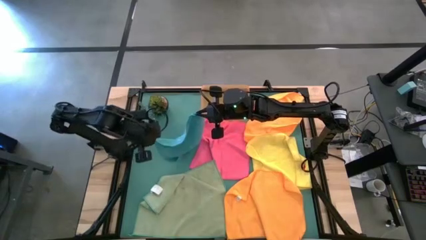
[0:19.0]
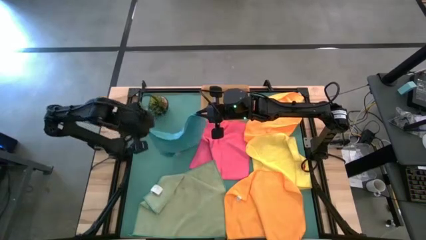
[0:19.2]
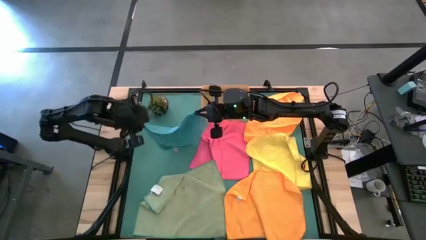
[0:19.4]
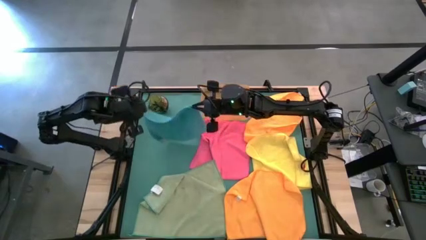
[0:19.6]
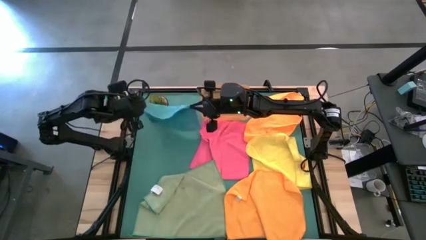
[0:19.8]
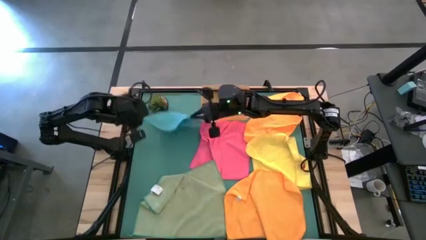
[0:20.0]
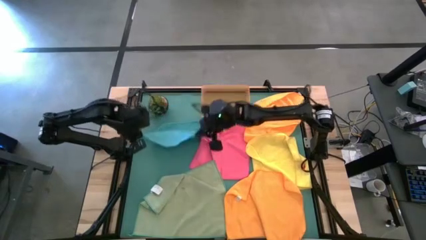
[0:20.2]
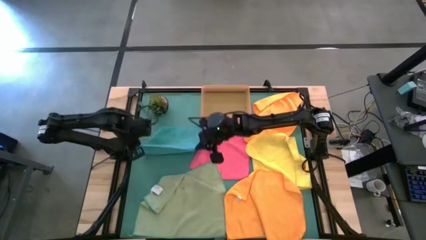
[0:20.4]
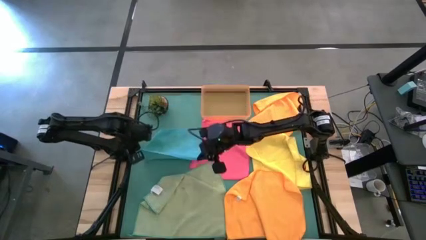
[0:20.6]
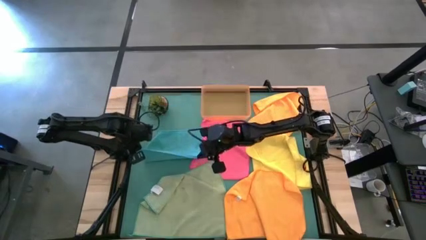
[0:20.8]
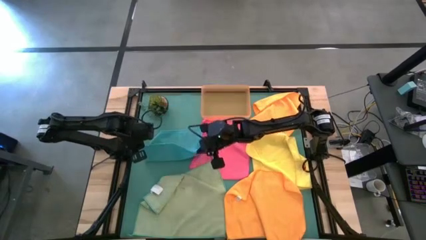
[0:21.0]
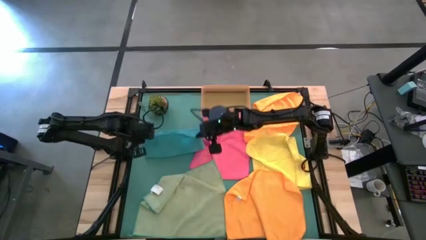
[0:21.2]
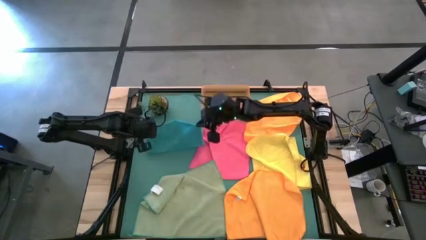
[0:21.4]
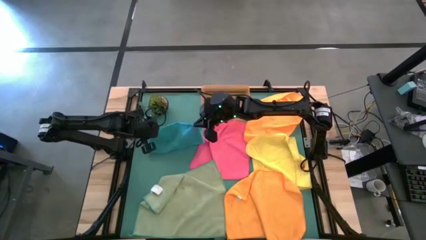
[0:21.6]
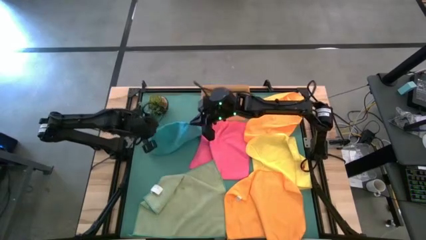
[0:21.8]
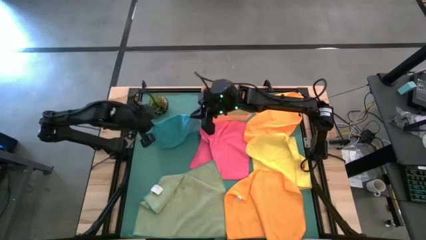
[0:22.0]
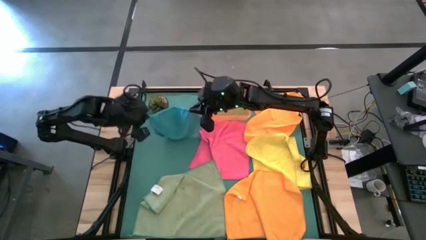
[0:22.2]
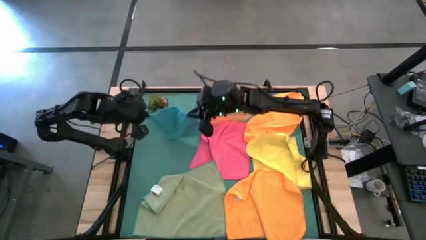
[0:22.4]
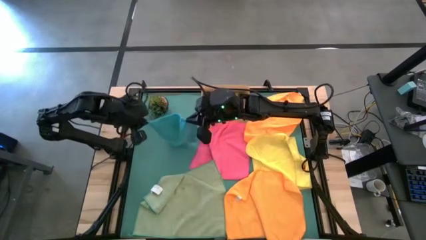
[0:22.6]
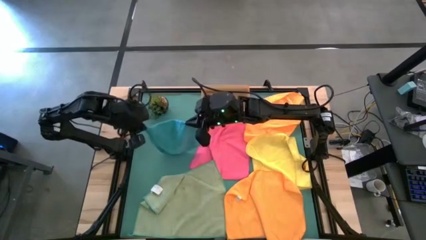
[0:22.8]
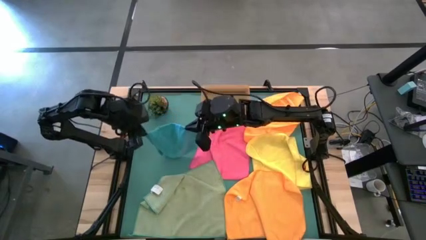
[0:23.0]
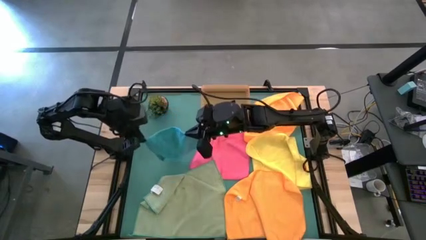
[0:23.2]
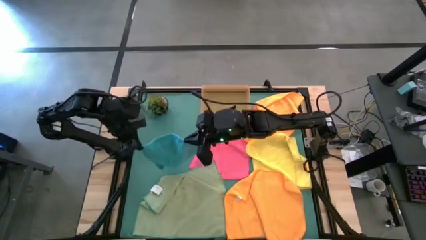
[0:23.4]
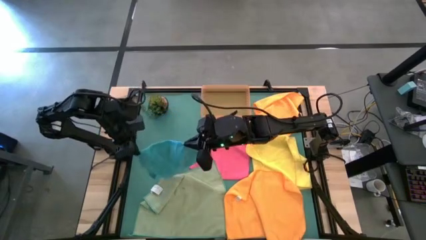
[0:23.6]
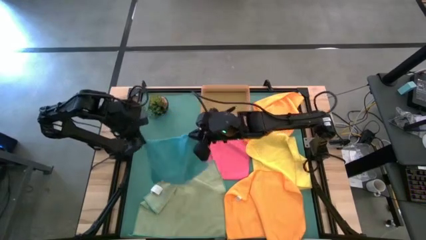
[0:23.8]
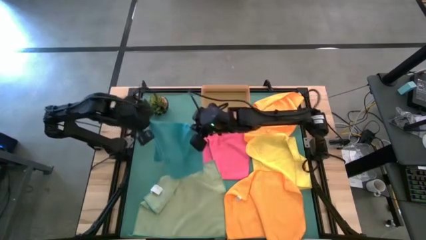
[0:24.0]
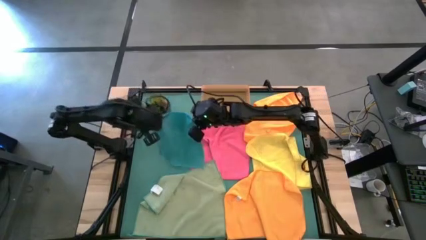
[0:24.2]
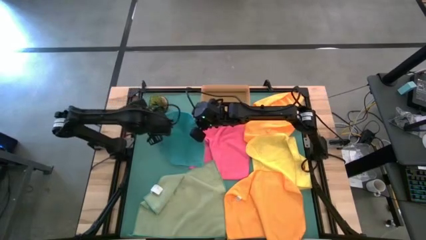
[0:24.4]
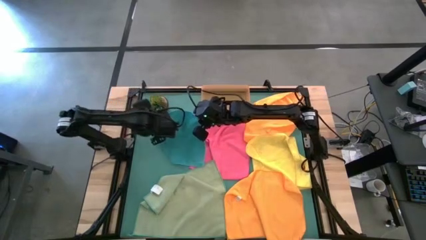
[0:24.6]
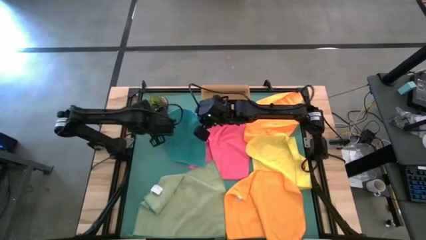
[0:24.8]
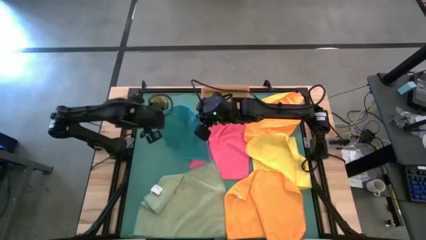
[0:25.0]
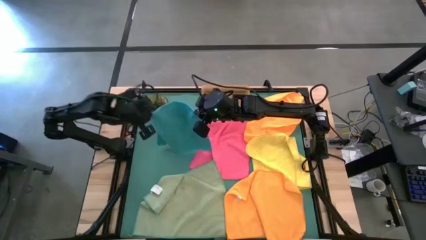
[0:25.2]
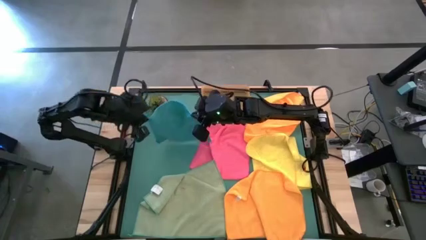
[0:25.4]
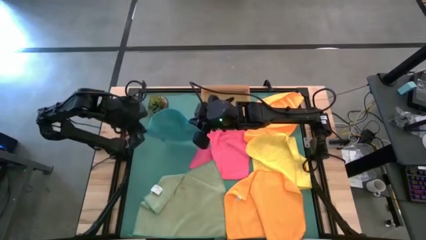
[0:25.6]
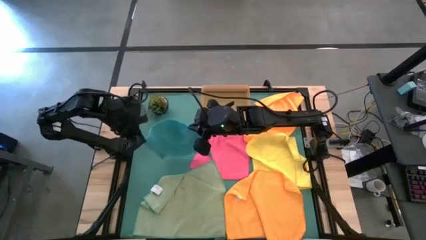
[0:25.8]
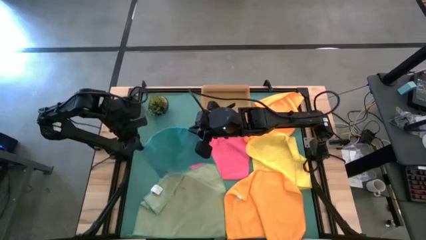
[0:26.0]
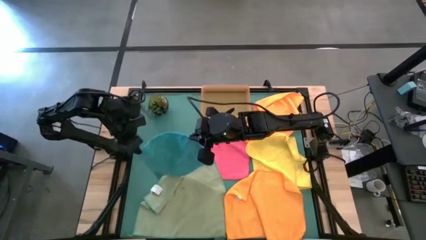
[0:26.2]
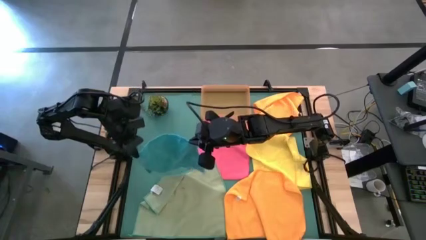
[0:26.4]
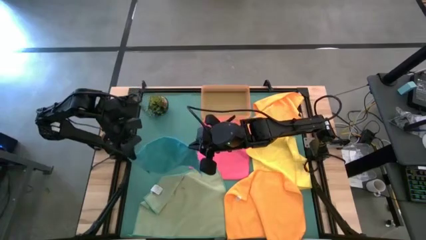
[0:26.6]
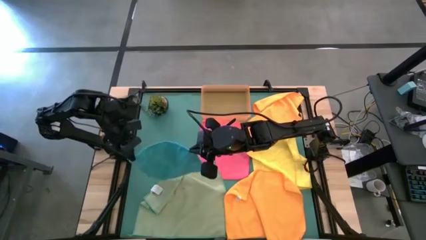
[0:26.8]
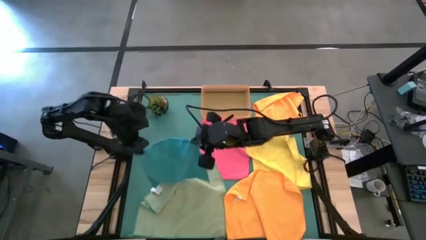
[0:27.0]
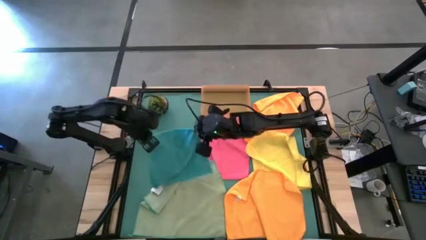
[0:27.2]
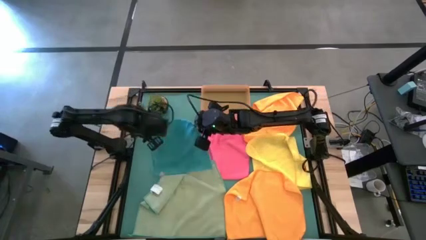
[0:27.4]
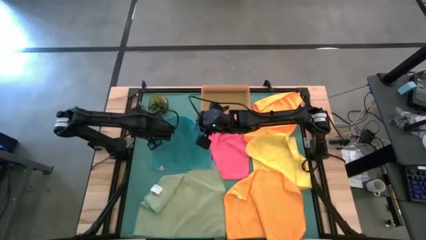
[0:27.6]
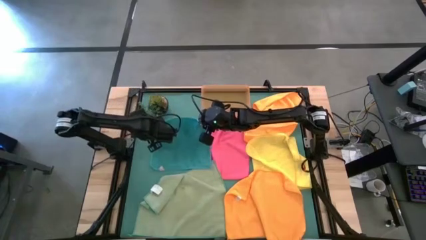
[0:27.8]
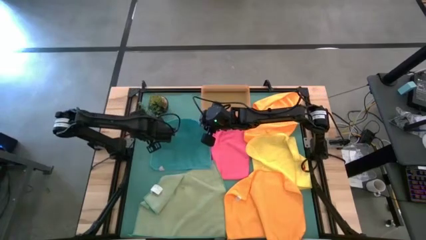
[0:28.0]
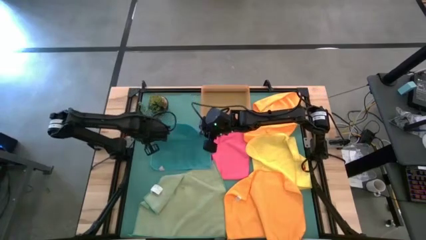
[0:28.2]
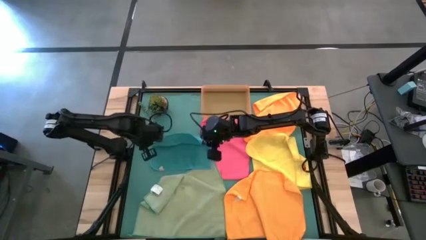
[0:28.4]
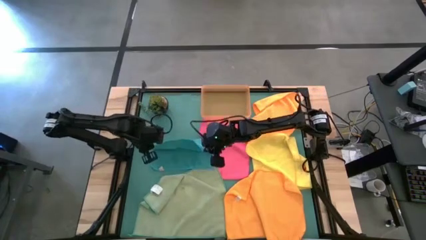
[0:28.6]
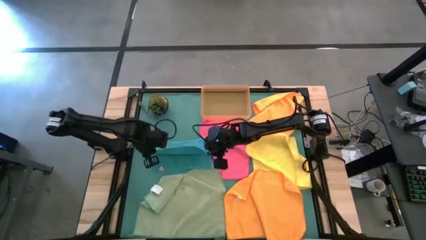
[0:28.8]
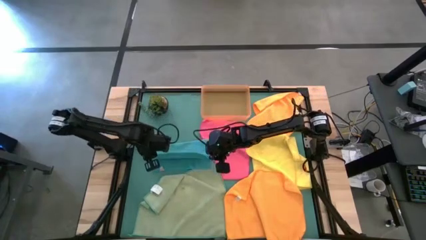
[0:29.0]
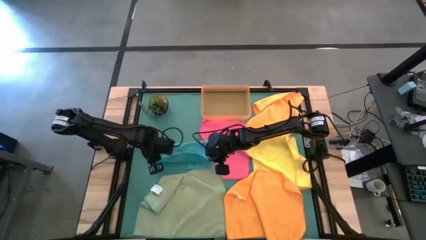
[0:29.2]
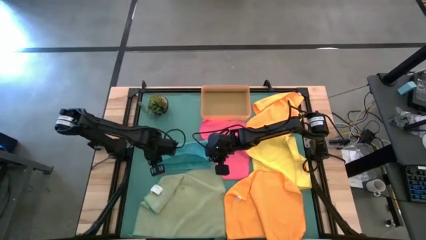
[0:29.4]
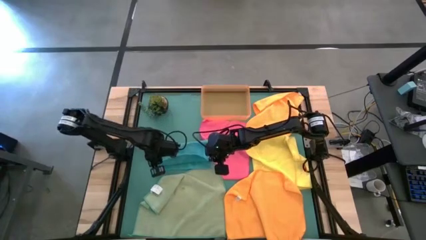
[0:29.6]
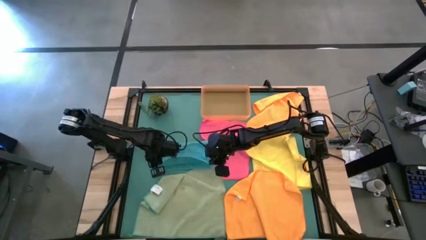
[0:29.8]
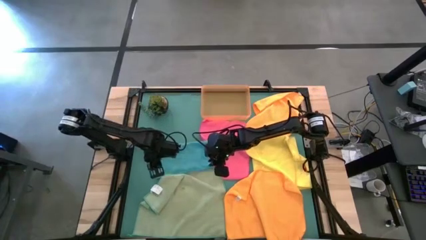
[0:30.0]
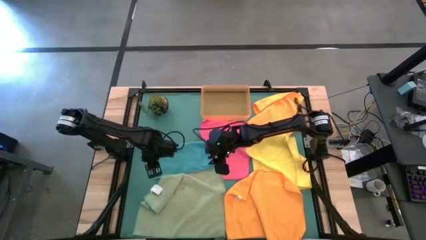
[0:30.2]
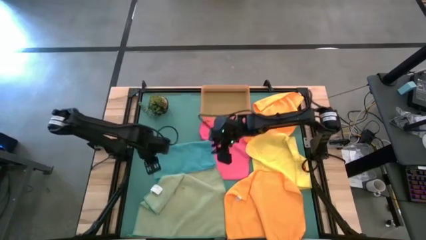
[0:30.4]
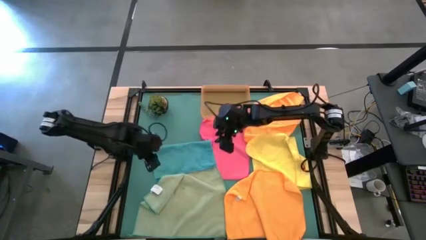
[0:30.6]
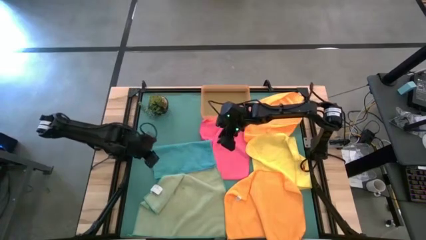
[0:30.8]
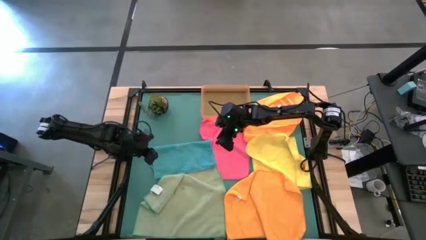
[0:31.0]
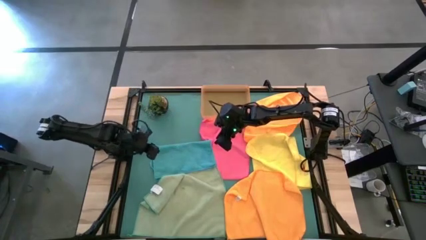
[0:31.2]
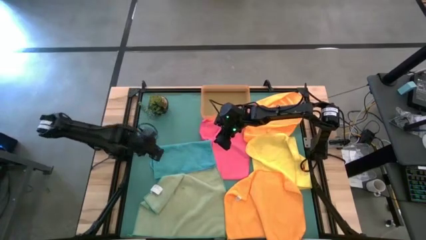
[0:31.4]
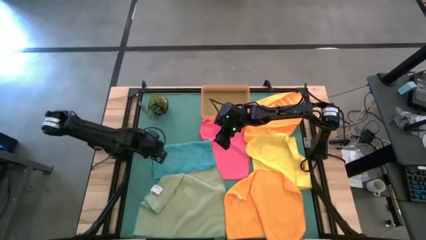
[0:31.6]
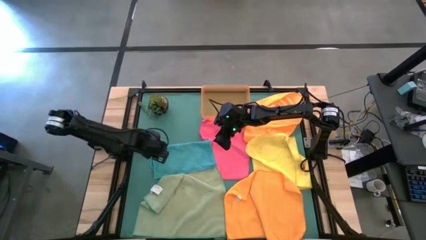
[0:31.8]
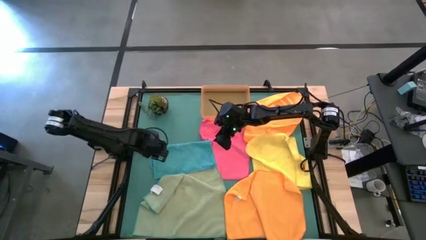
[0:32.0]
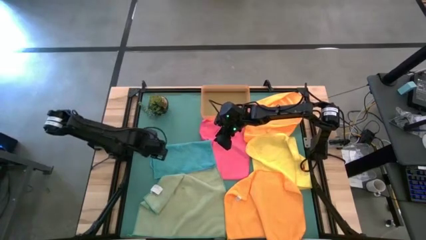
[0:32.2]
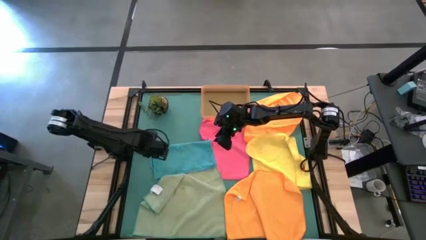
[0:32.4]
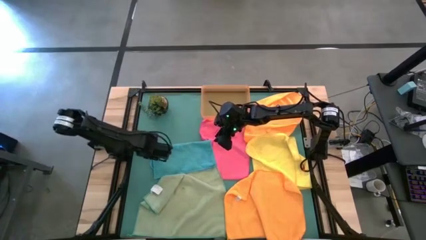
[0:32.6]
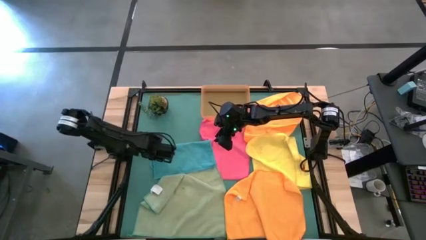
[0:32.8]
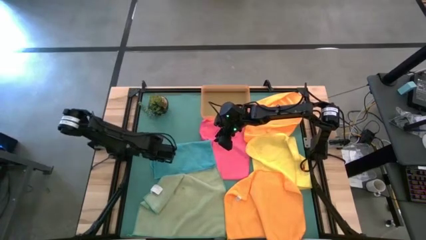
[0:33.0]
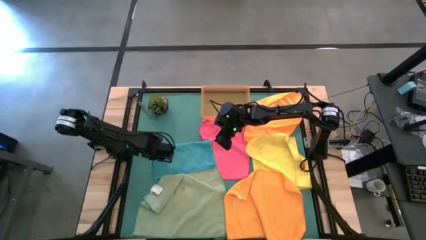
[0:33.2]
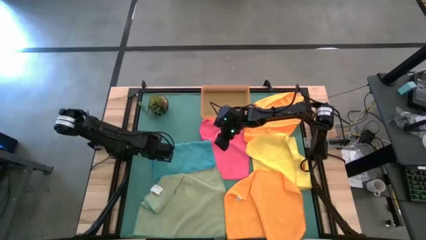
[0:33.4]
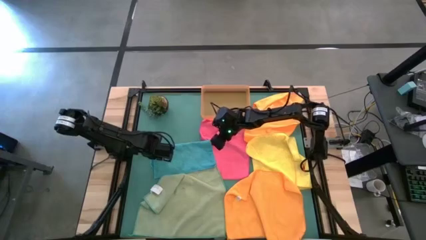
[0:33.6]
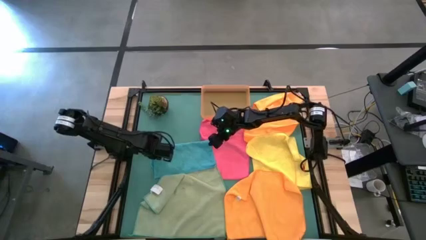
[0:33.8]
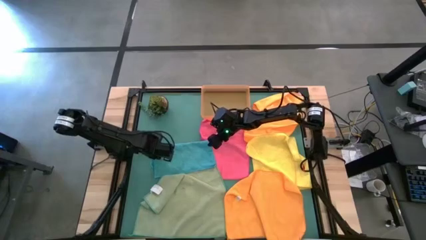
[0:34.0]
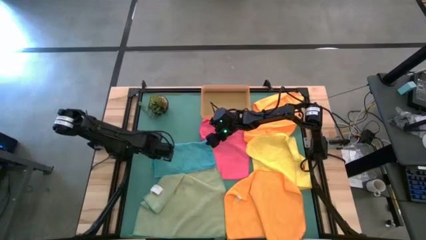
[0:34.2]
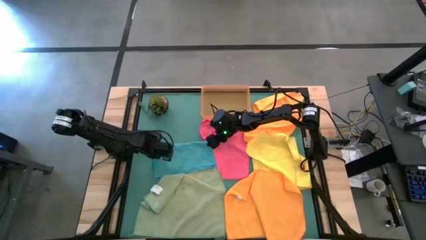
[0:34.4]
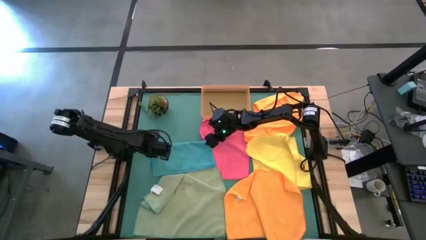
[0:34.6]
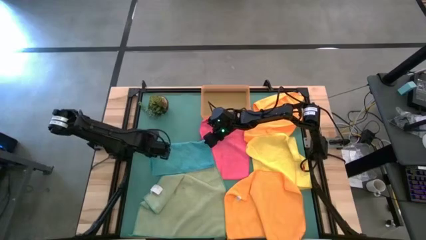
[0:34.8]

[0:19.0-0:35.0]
Task: Fold microfiber towels
Fold the blue microfiber towel

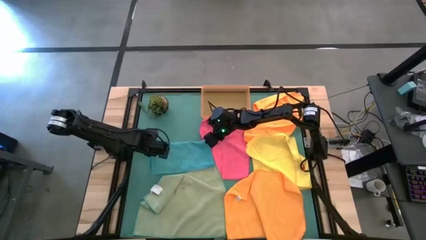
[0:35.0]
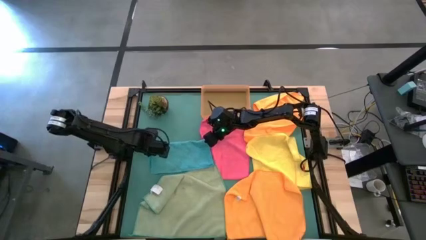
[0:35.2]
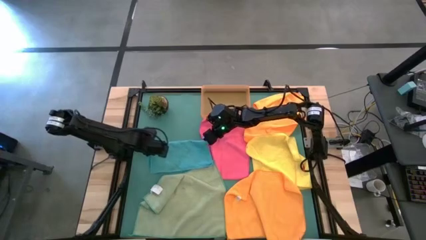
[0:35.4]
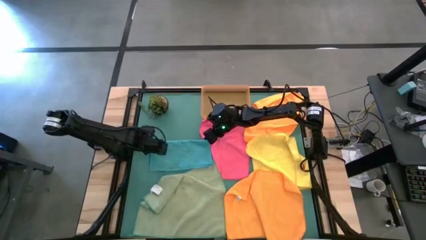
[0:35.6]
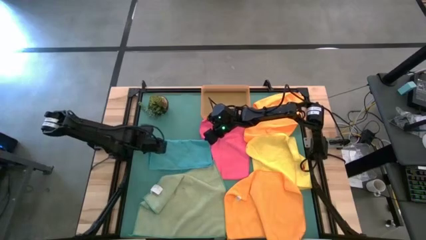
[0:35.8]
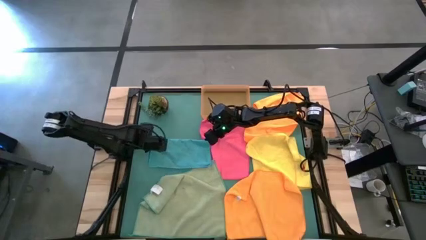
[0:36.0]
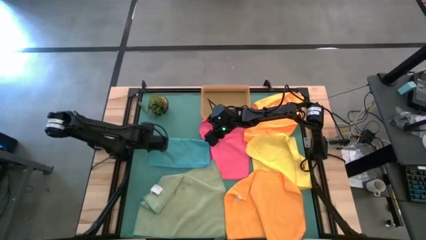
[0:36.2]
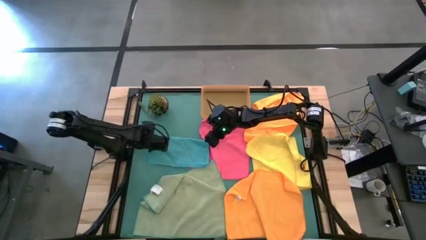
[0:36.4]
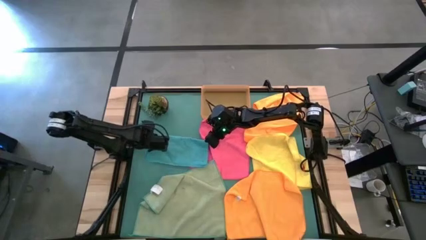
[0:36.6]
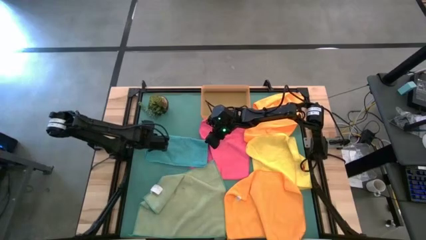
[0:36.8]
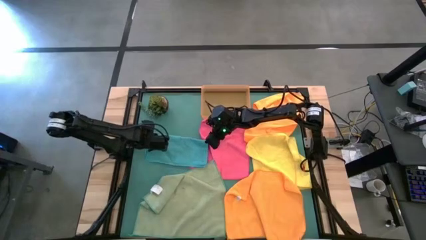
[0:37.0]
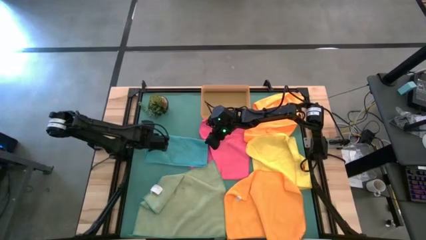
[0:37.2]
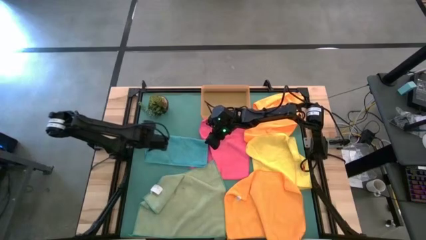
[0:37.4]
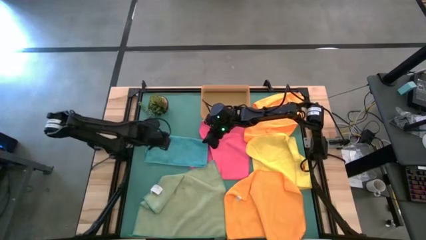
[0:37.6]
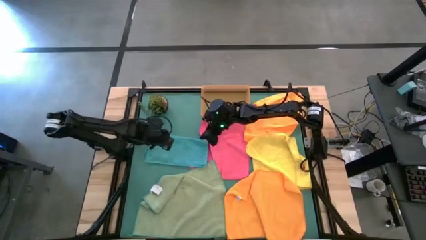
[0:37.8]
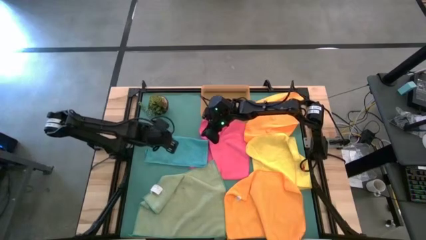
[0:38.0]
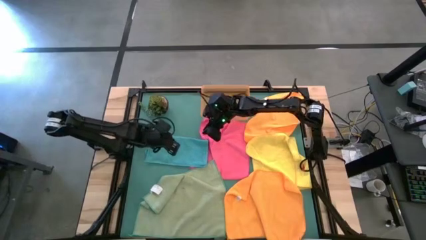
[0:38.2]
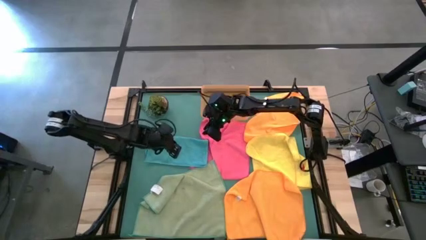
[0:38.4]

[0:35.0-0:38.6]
Fold the blue microfiber towel
